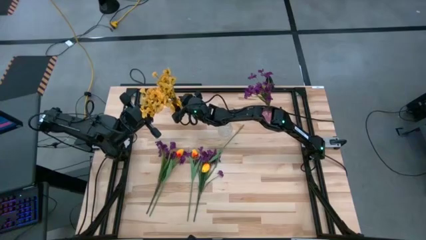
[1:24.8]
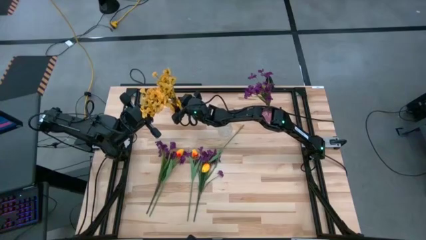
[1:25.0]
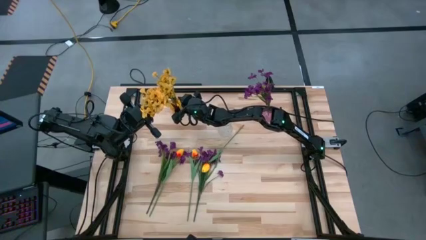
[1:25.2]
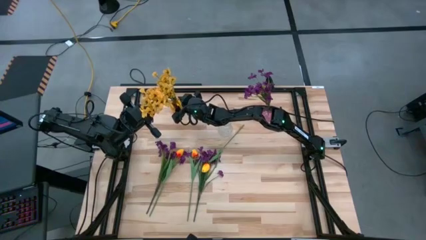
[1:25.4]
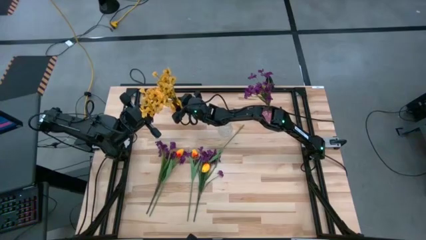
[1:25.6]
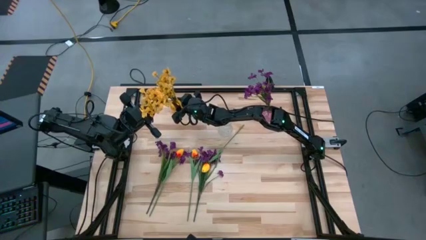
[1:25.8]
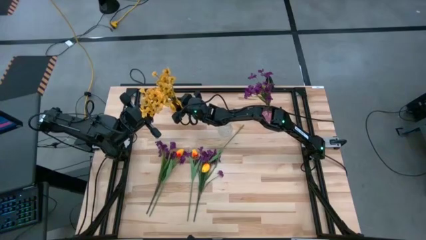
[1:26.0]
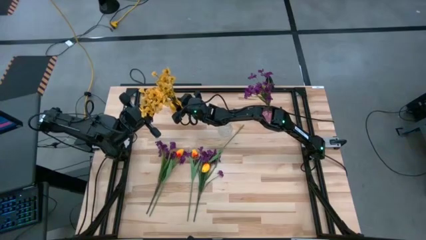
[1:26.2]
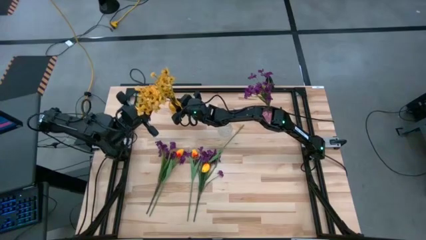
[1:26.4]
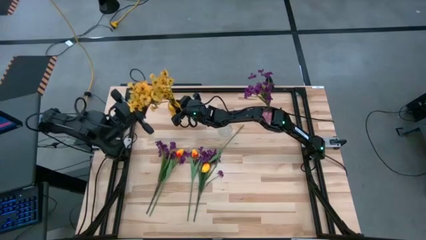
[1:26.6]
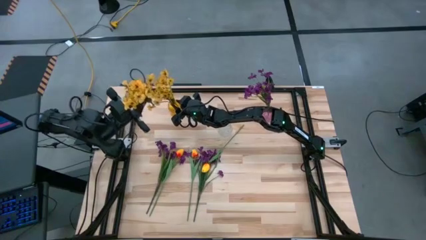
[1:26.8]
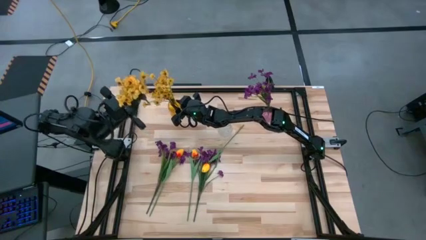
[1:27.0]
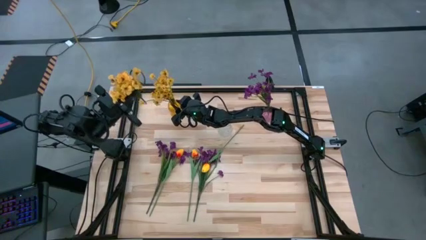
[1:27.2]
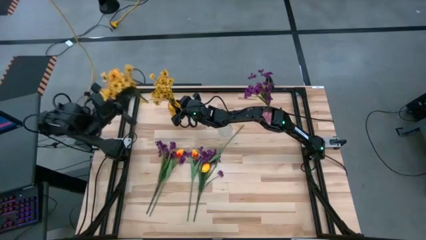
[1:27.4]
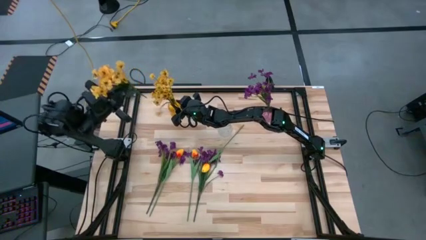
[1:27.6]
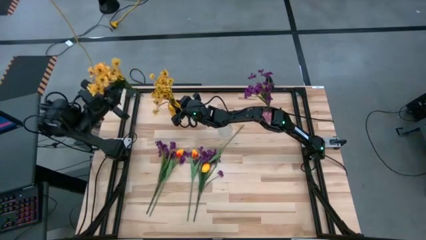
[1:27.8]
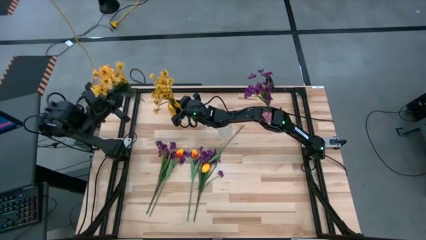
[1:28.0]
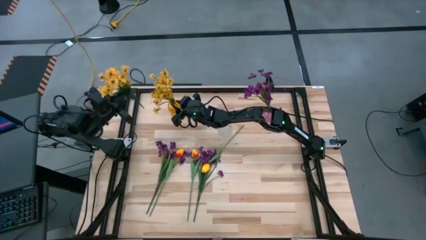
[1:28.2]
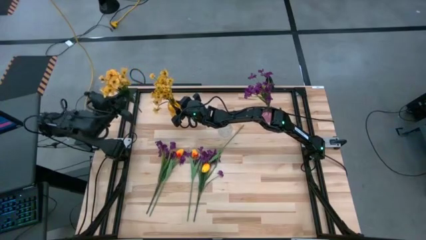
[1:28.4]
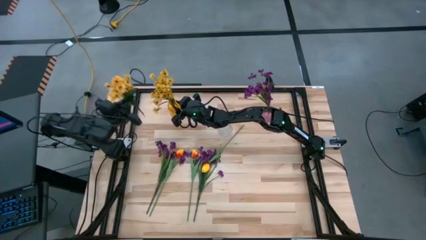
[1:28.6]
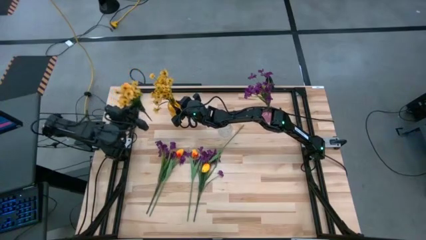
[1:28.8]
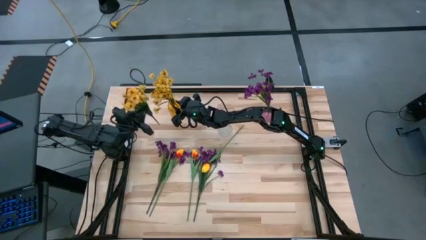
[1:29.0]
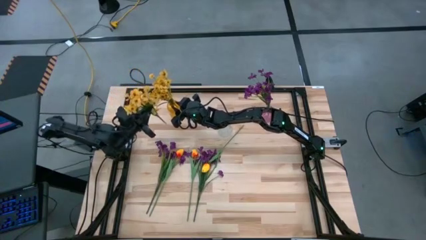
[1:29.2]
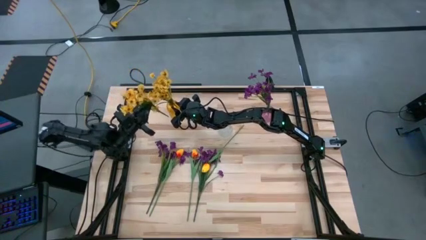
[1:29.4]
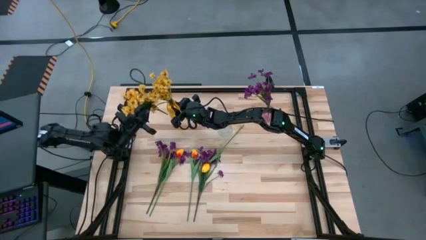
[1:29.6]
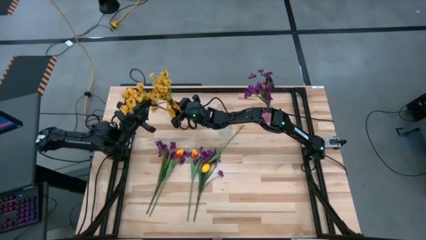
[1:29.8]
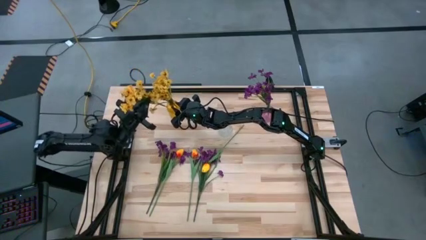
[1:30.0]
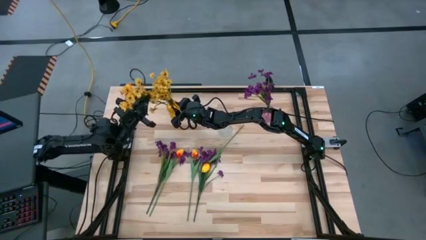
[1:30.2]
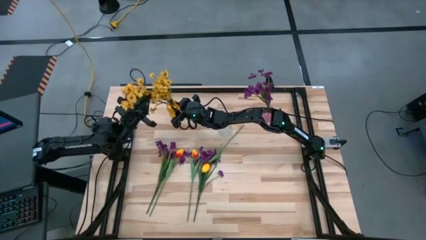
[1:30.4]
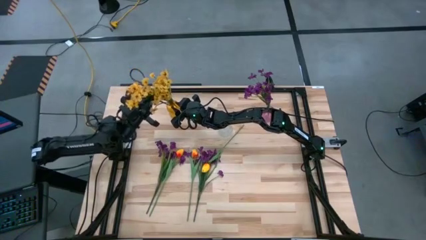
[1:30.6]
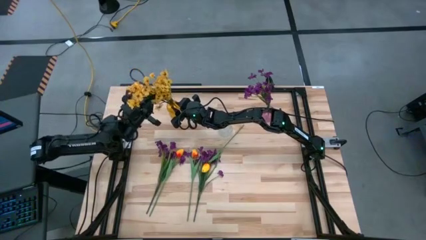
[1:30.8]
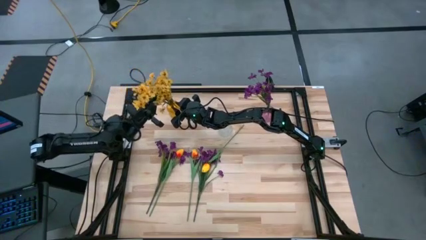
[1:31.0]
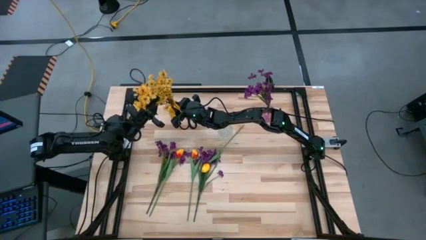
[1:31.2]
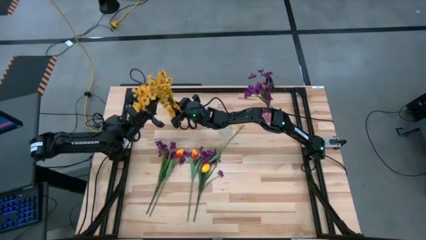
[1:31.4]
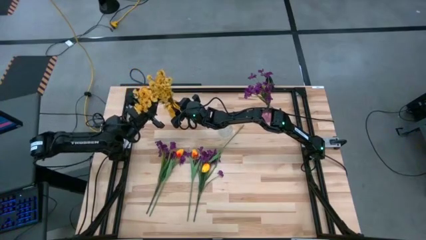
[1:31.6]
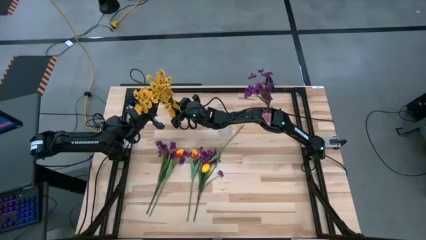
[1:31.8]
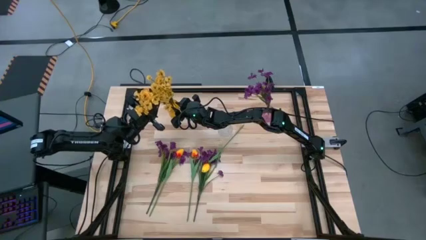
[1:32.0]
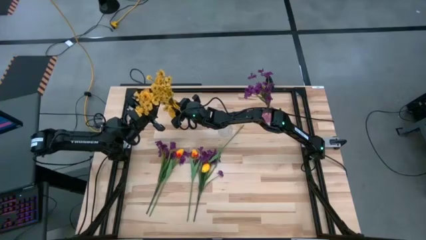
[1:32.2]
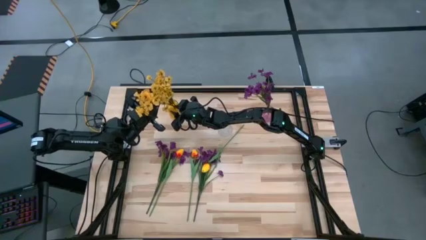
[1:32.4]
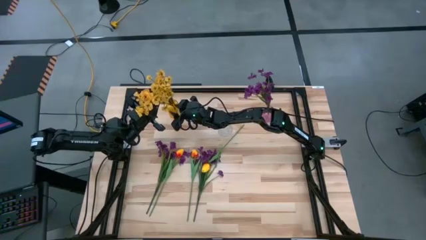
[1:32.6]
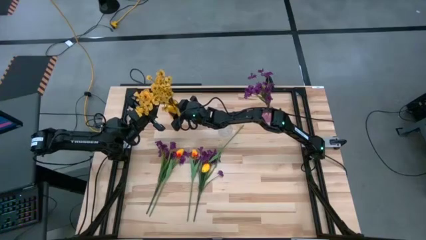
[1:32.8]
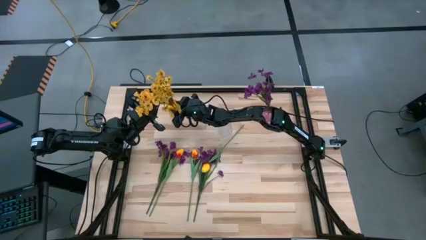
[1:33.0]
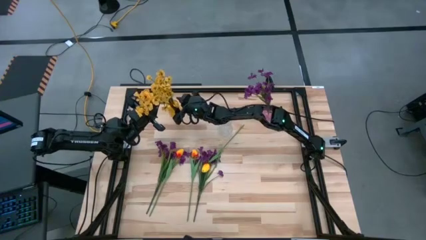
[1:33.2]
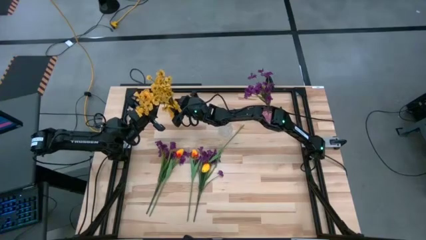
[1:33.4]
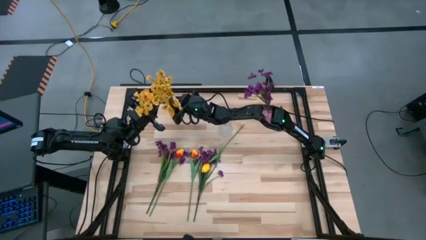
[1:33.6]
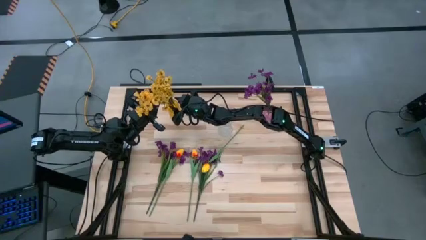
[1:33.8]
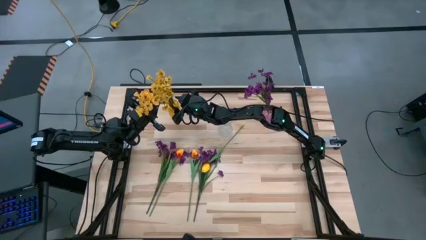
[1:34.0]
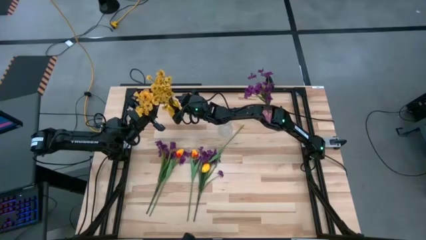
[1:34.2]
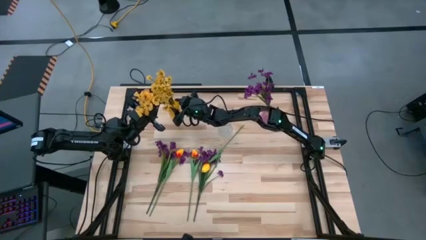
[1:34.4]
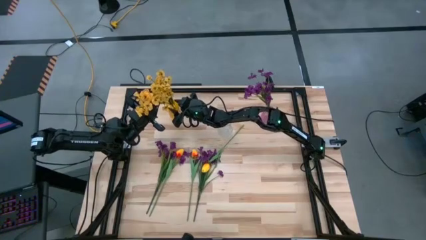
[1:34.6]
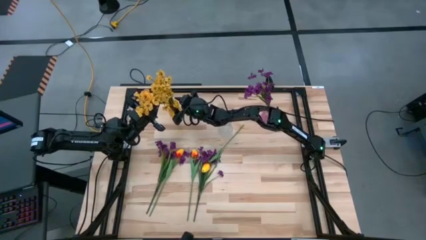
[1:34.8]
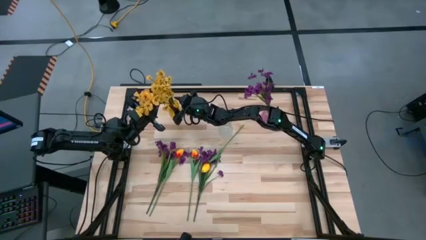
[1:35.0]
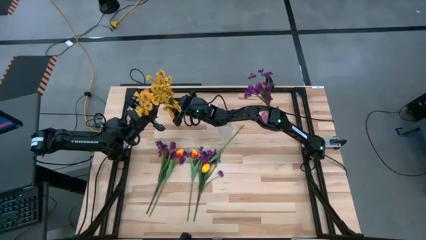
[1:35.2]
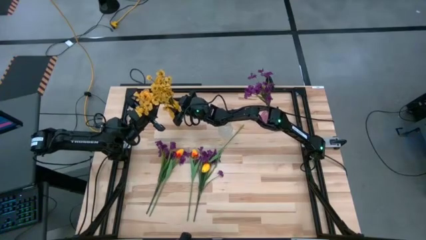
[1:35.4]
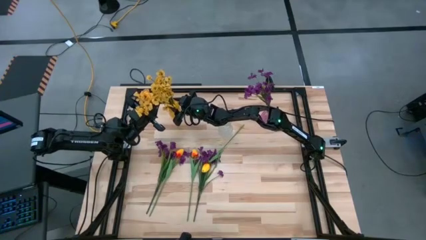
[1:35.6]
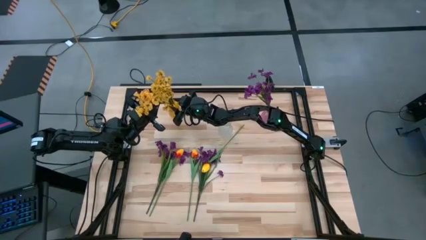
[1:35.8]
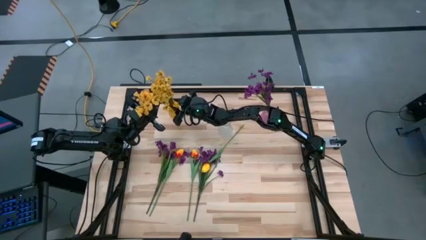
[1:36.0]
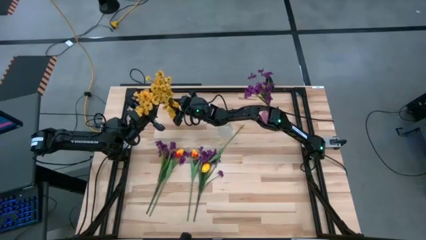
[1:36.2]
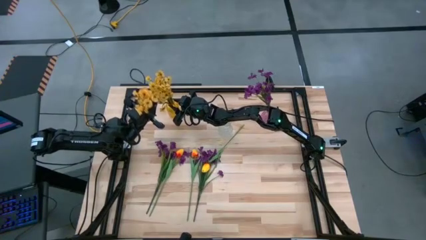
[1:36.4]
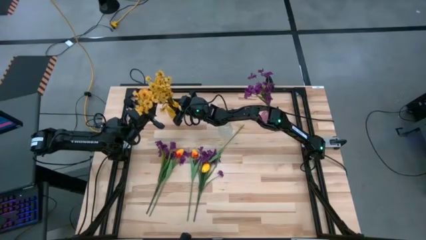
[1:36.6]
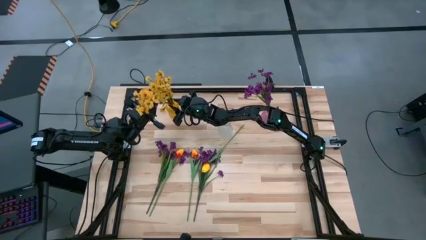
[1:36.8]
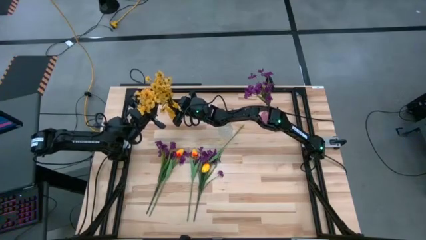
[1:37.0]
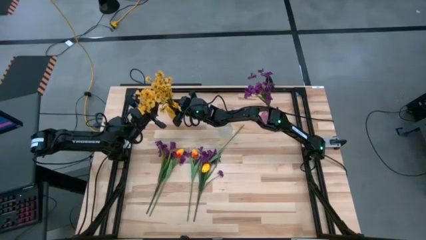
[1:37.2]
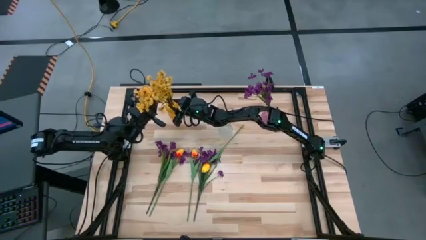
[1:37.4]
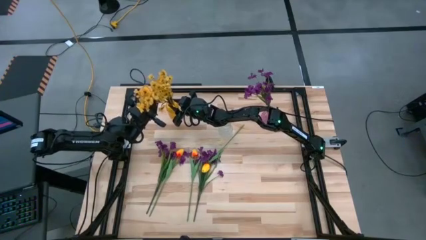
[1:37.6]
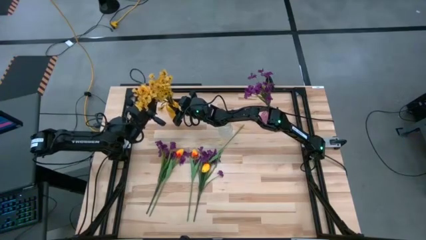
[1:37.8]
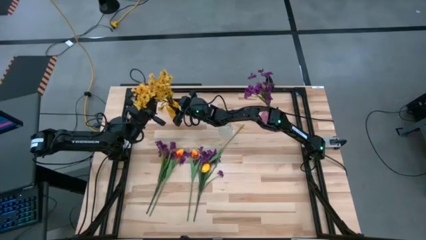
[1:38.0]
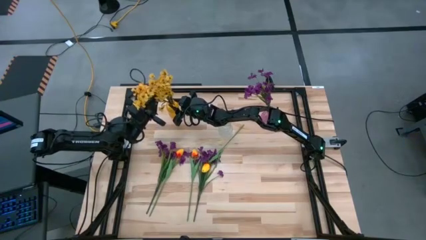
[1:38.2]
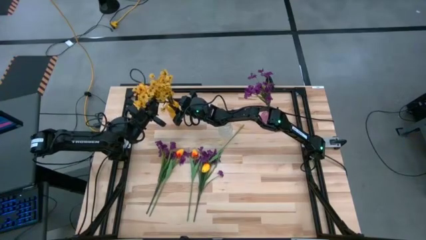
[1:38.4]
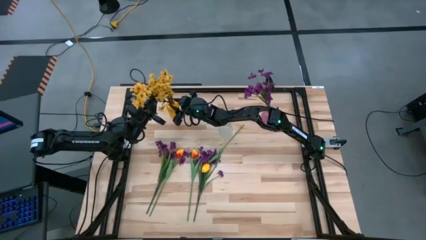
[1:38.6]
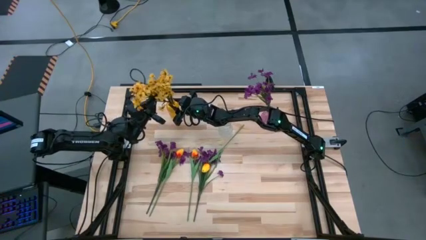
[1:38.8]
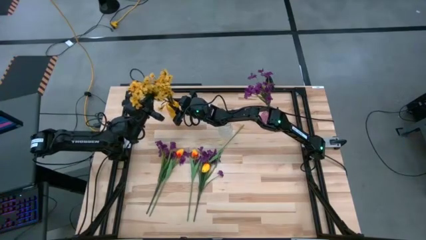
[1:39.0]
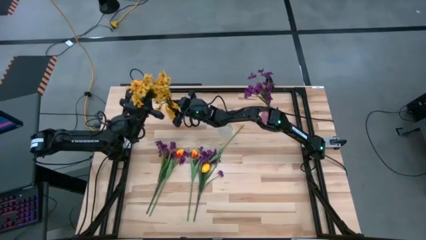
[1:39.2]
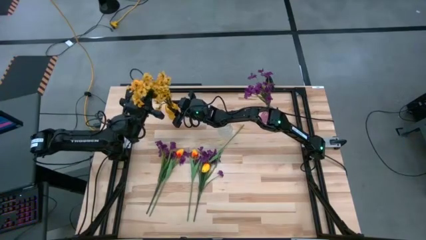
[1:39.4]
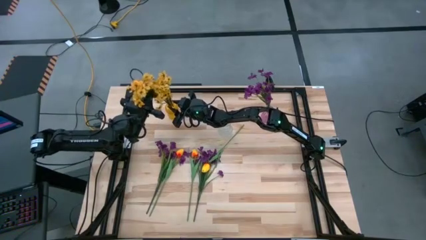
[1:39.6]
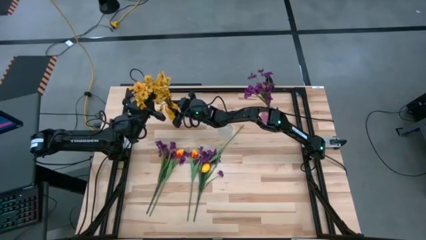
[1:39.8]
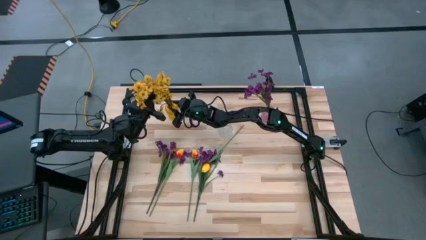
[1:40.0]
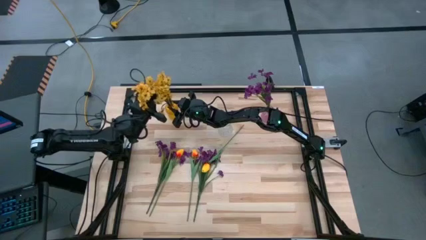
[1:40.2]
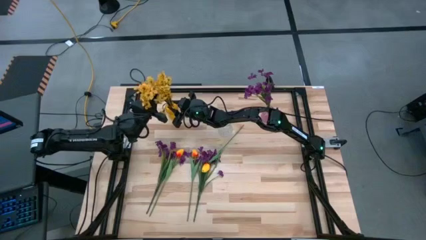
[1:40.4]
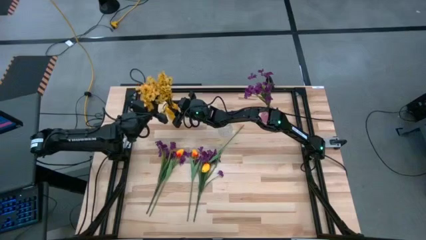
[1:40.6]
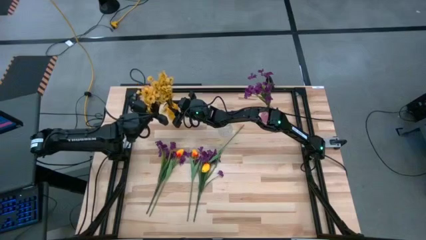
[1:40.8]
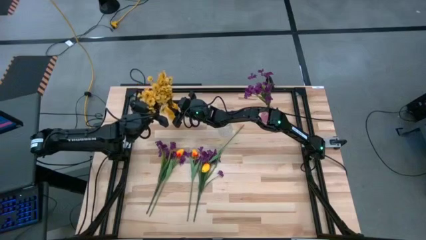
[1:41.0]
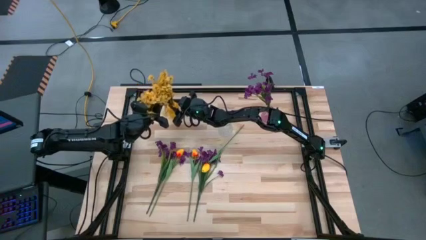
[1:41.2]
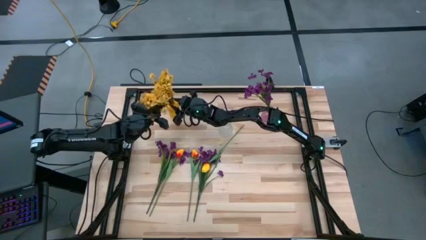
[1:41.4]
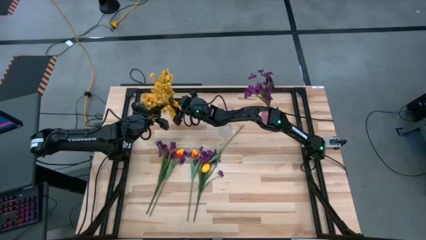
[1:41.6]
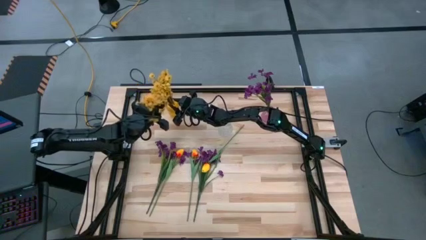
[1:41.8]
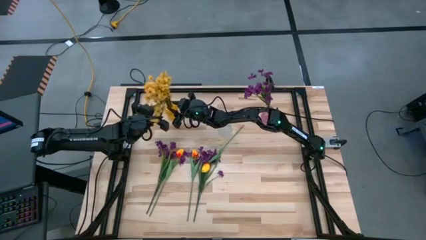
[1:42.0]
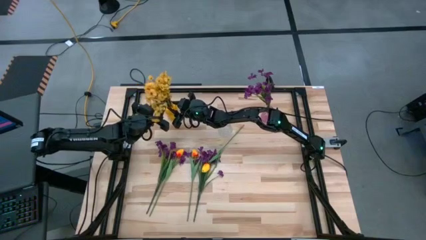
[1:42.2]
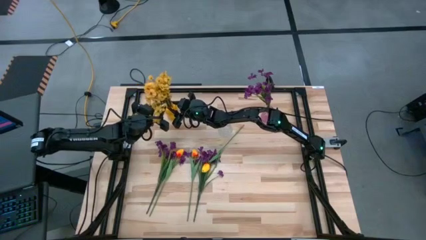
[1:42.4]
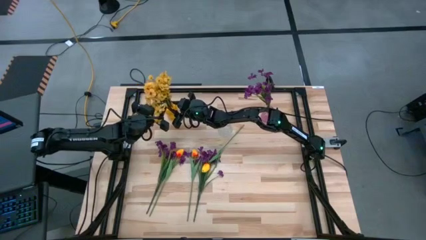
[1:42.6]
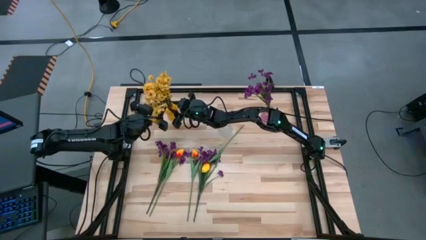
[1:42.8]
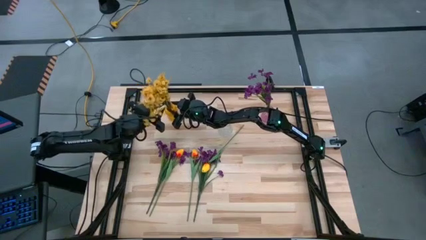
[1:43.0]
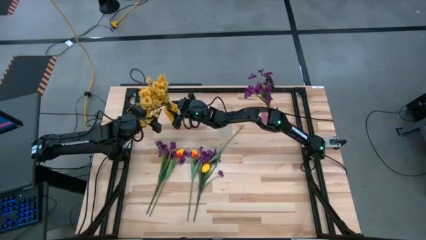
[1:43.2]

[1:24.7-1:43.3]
Task: Sort flowers into vase by color
Put the yellow flowers into the yellow vase
